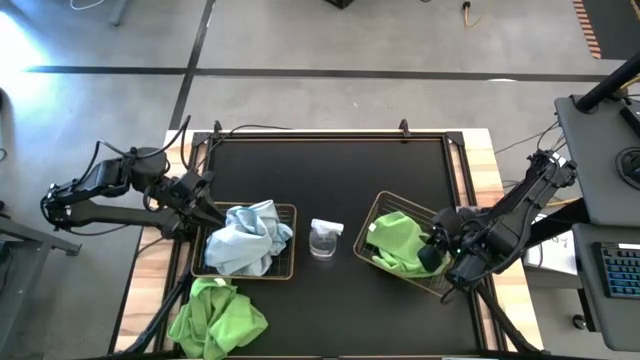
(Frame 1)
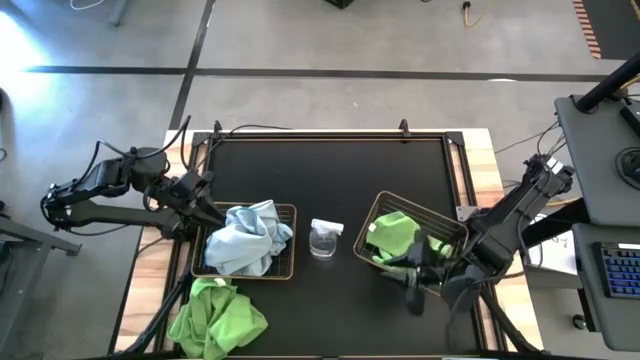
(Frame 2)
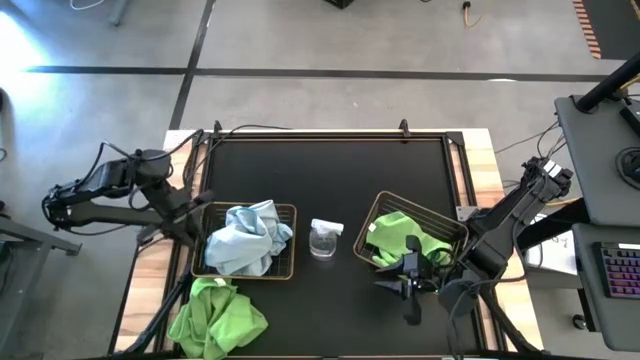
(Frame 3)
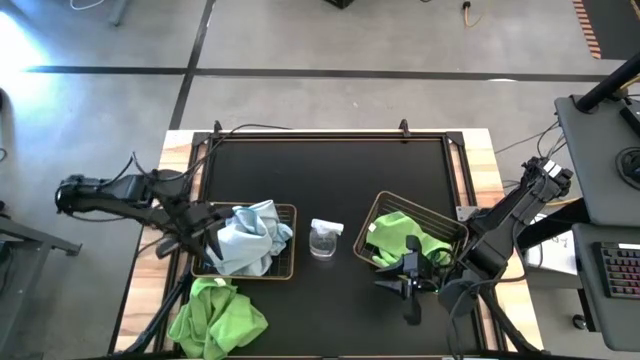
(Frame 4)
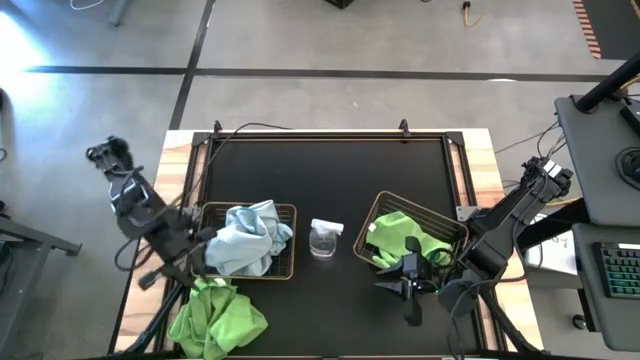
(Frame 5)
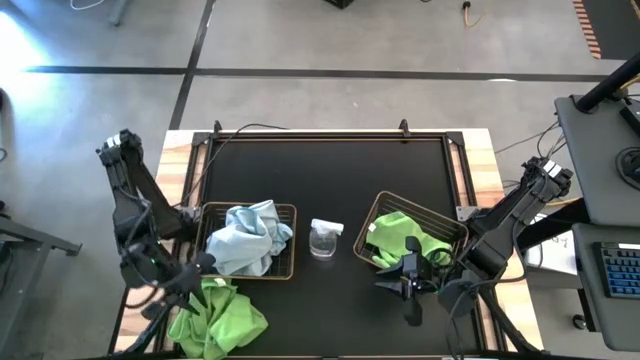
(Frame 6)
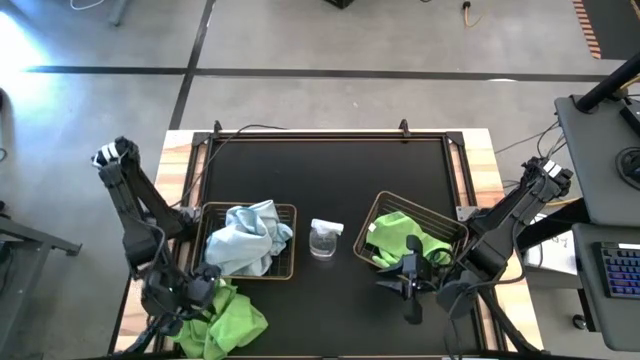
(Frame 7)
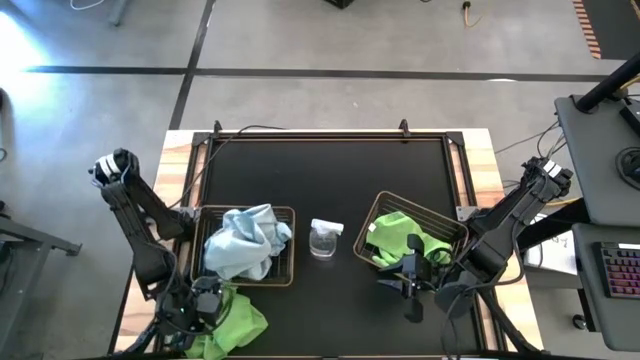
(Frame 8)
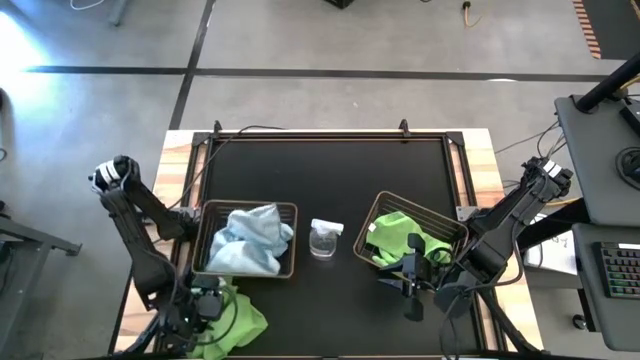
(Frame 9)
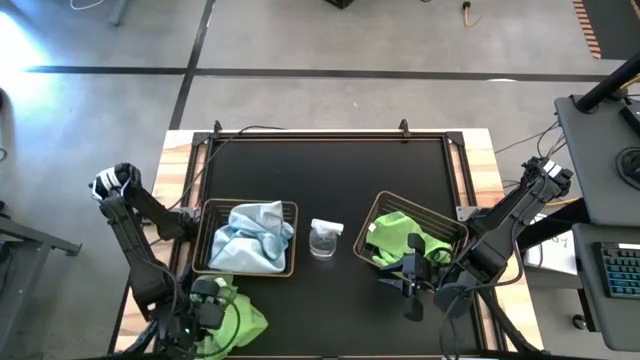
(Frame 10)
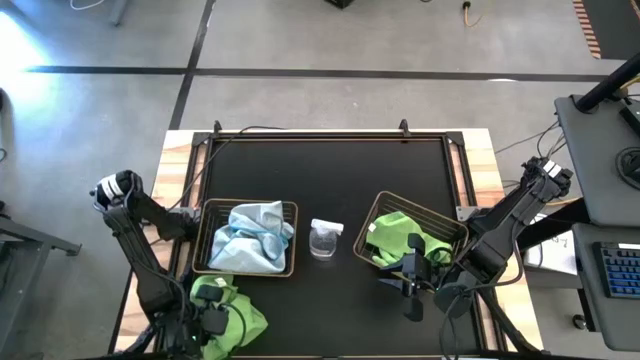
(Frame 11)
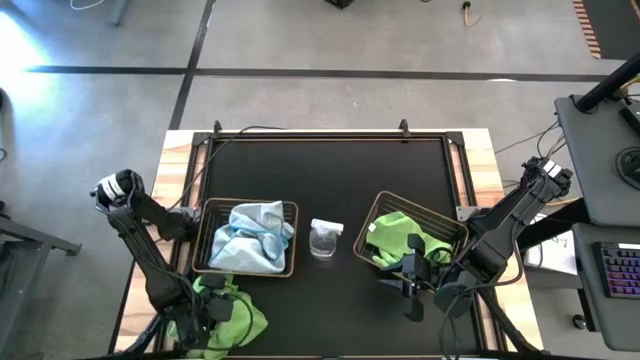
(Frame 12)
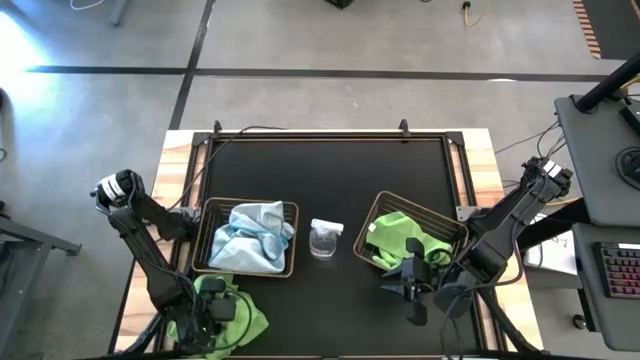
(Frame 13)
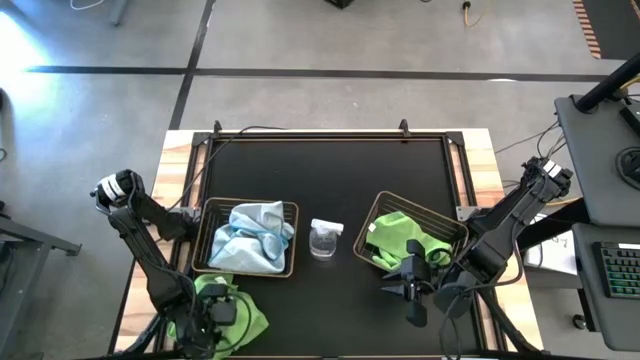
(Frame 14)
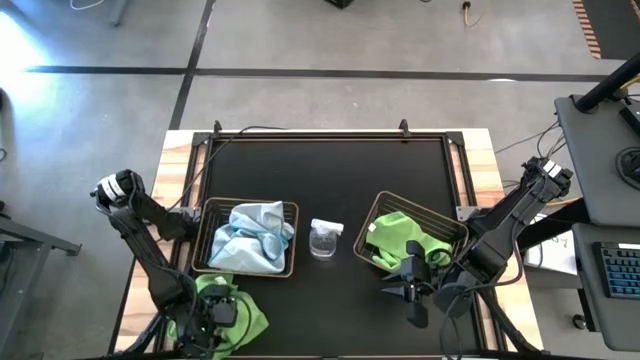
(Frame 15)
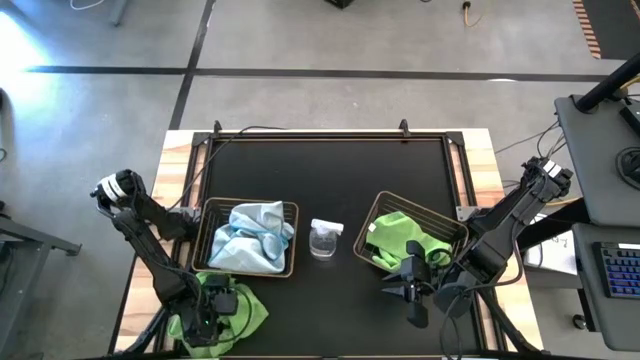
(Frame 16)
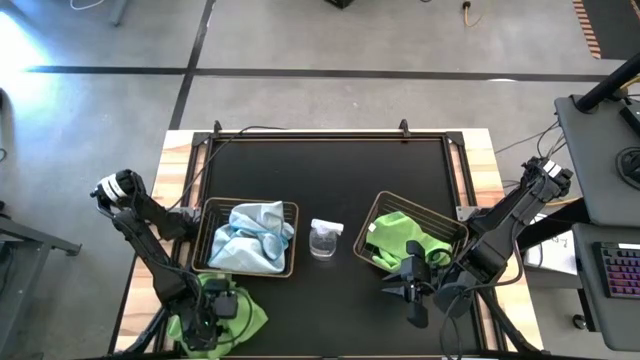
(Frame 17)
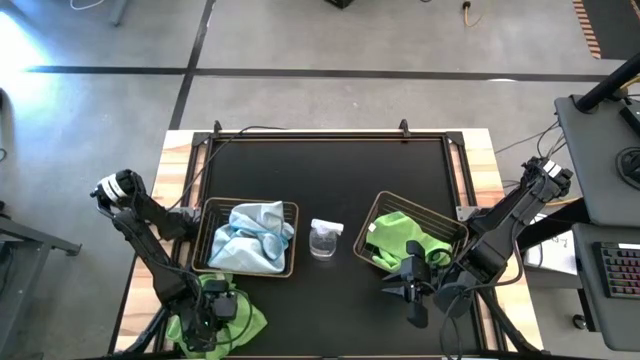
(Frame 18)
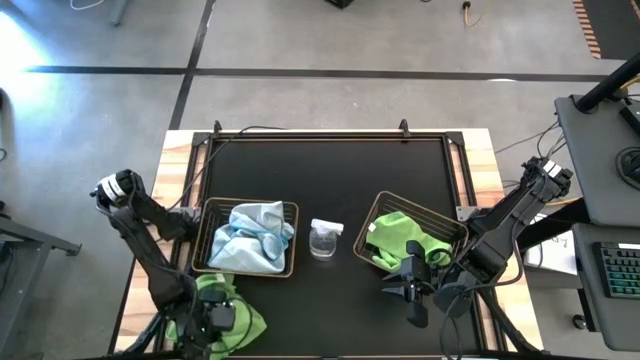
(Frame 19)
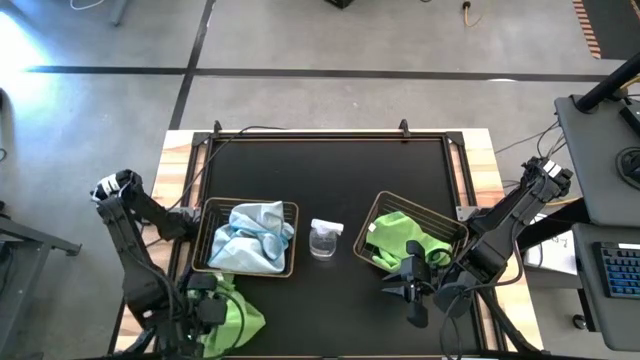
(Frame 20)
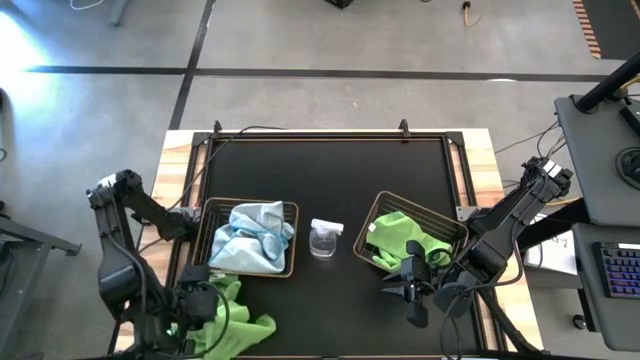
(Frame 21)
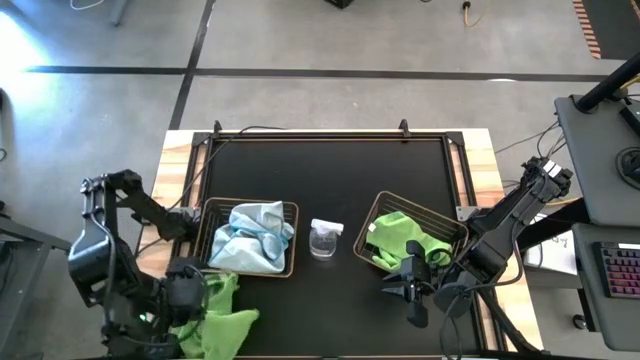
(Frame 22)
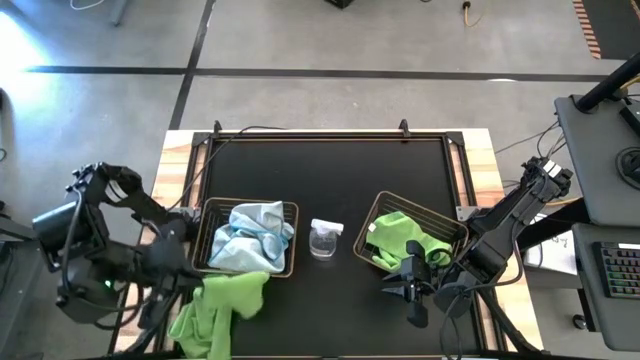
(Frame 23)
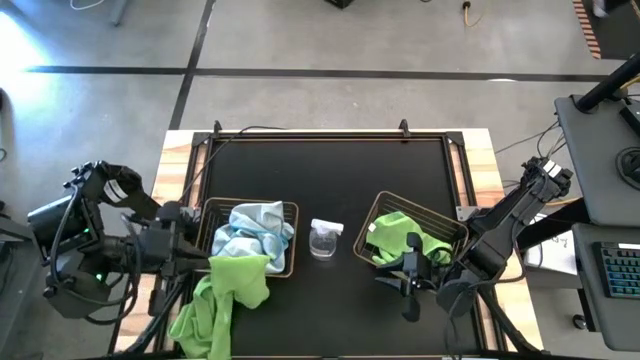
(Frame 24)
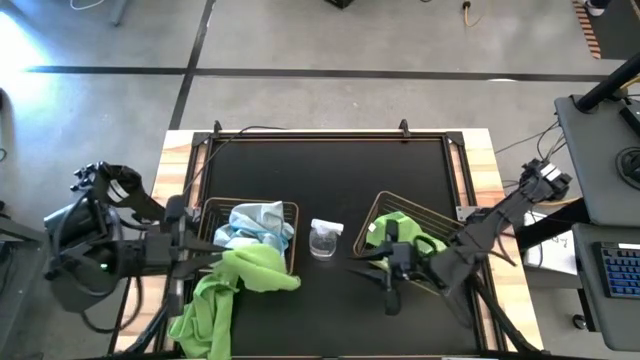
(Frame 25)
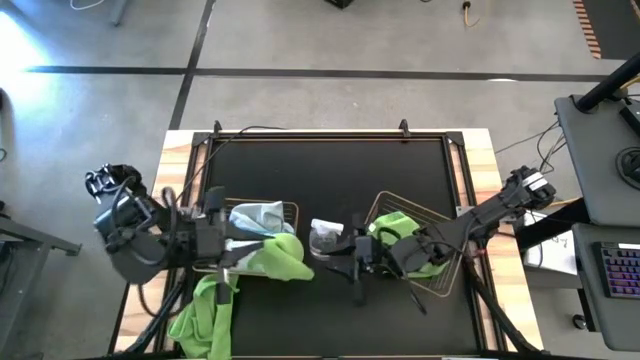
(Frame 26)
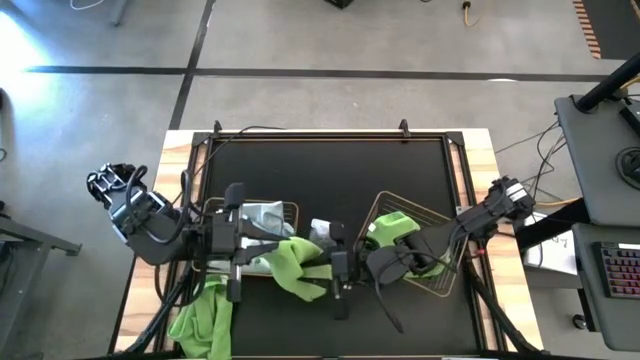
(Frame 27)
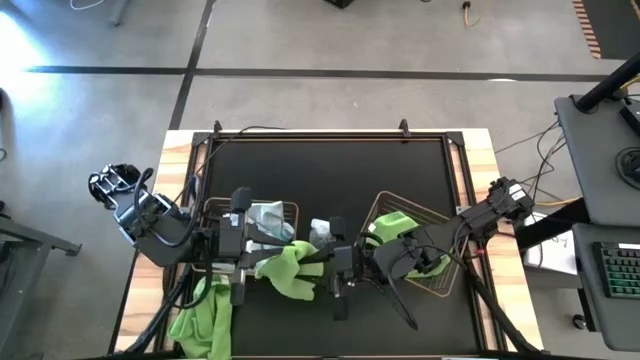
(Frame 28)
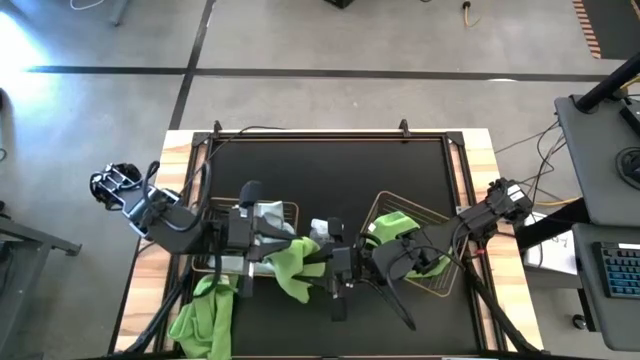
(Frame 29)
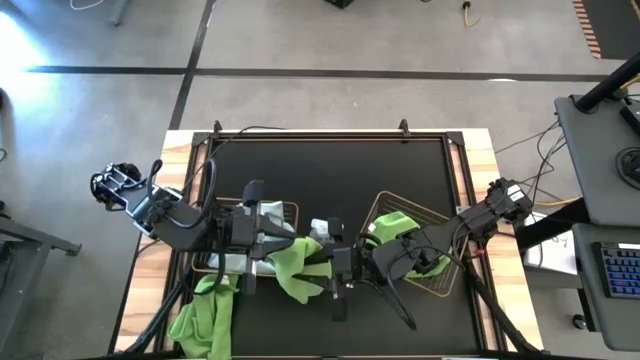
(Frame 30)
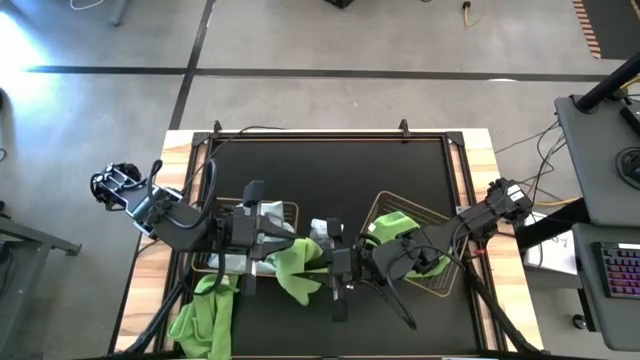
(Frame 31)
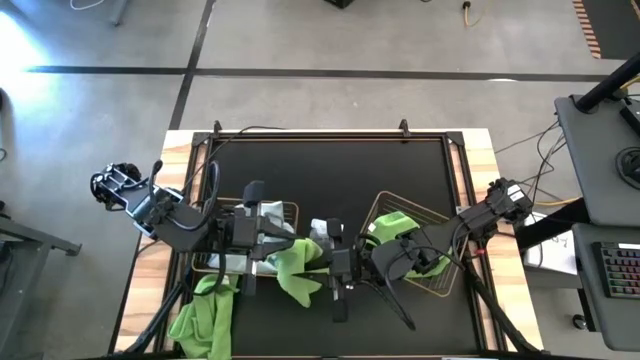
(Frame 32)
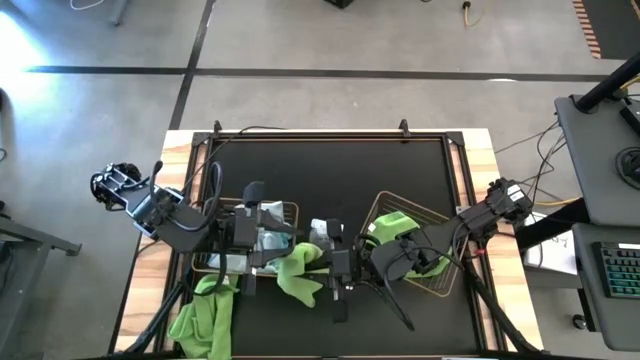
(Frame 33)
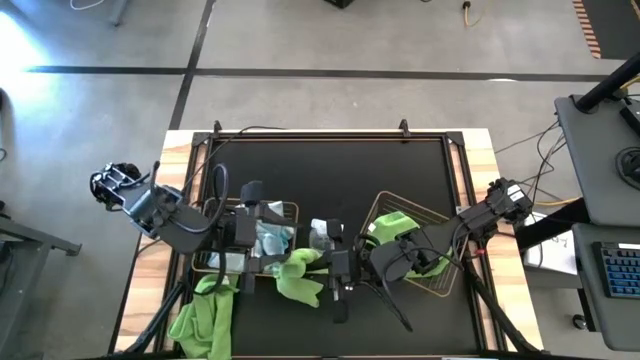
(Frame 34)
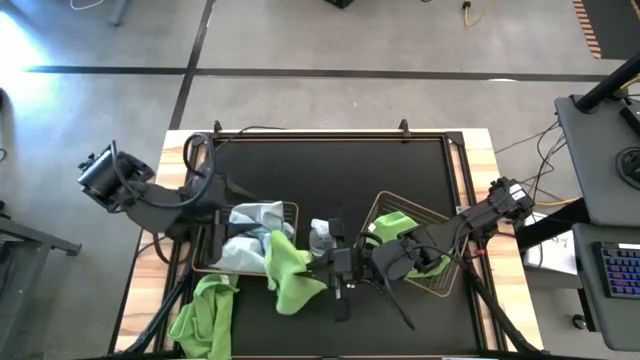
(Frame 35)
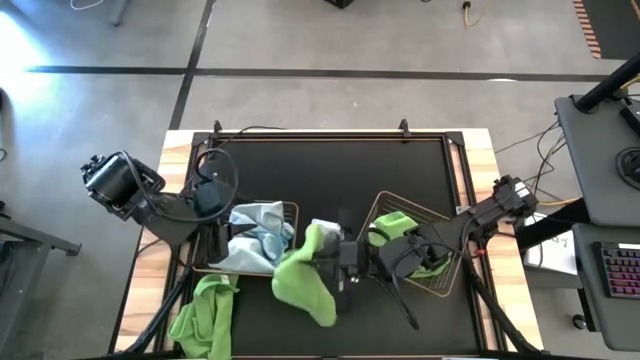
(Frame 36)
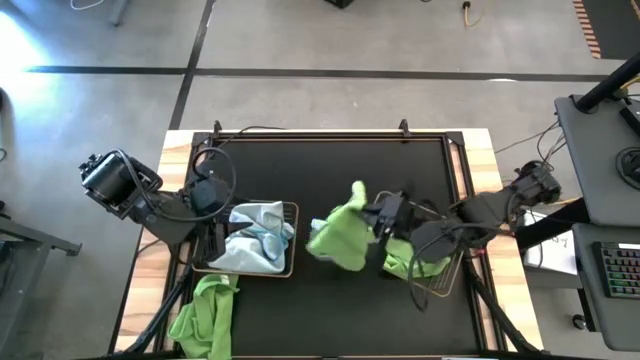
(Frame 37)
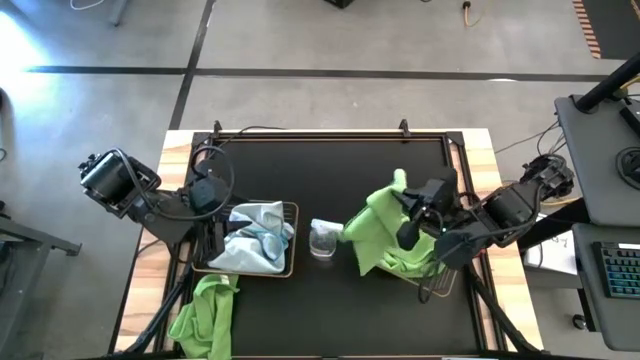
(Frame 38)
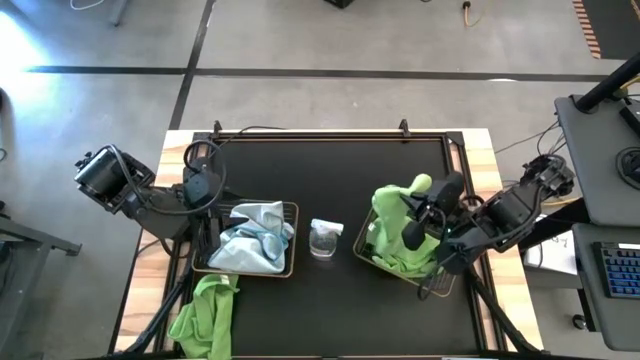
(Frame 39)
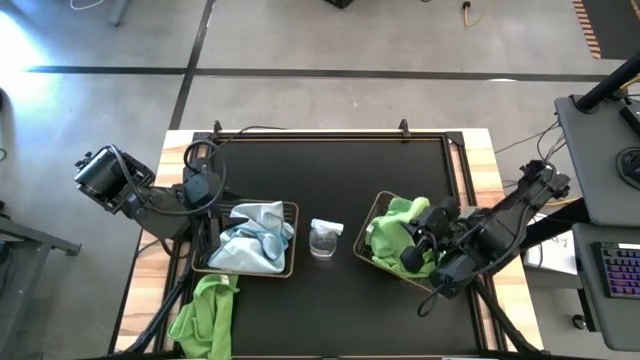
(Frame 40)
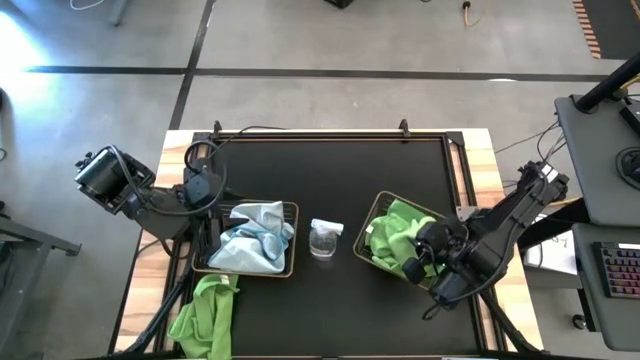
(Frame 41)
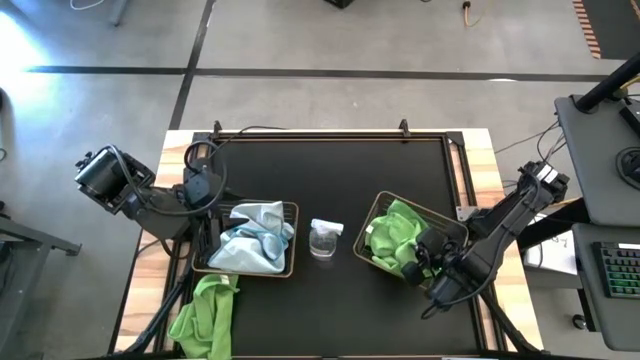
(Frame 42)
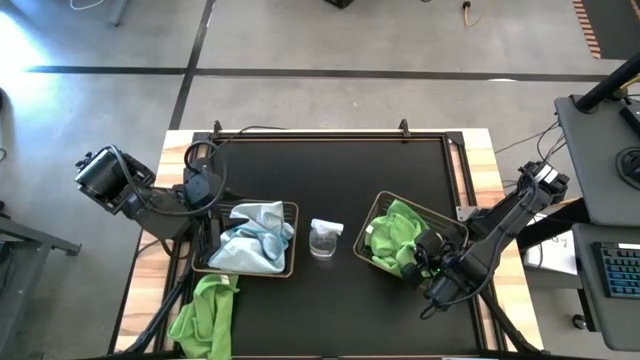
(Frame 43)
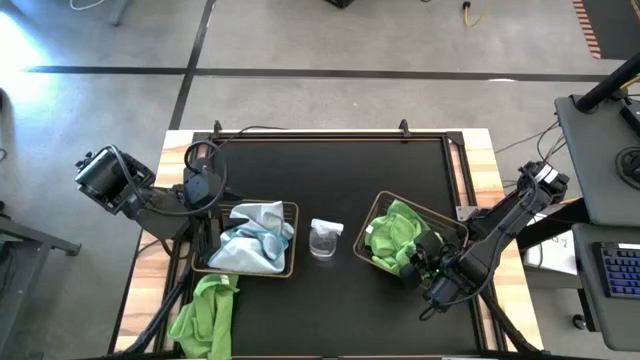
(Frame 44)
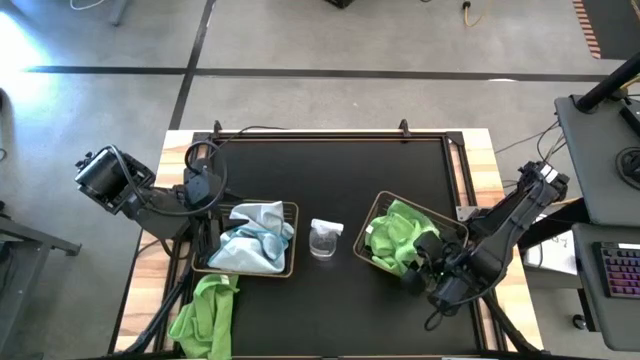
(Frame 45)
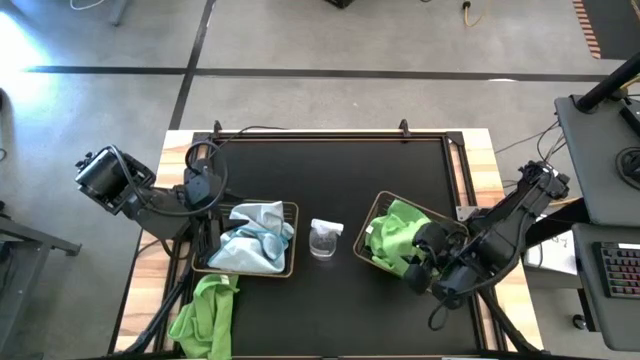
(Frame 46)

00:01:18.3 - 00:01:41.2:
Task: Sort microfiber towel by color & place in baskets
Put the green microfiber towel into the right wire basket
